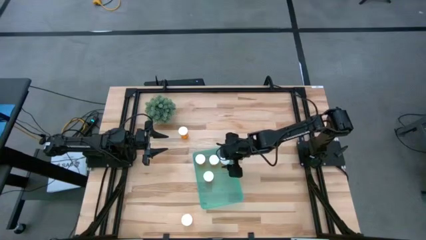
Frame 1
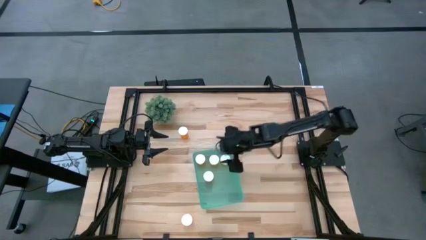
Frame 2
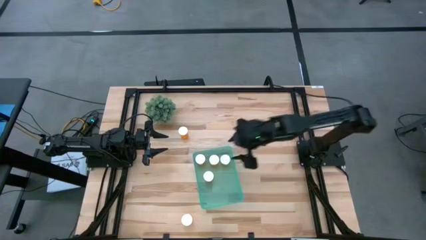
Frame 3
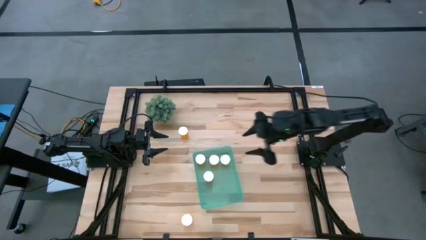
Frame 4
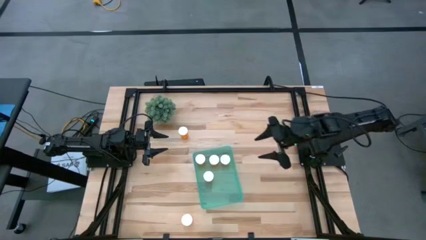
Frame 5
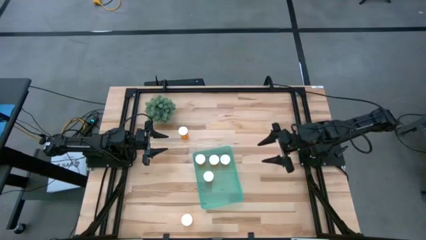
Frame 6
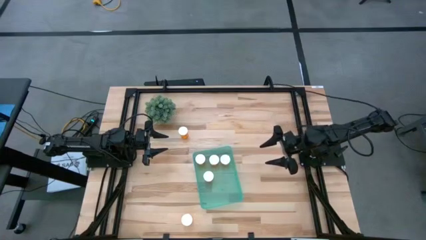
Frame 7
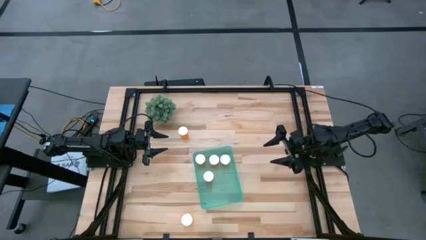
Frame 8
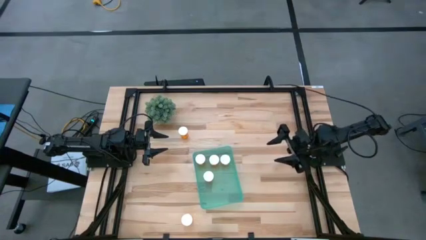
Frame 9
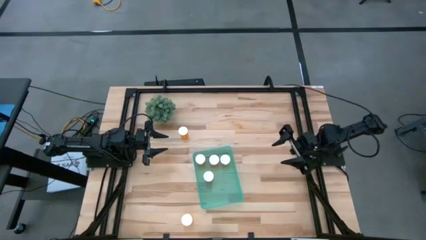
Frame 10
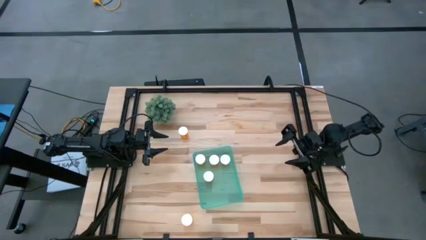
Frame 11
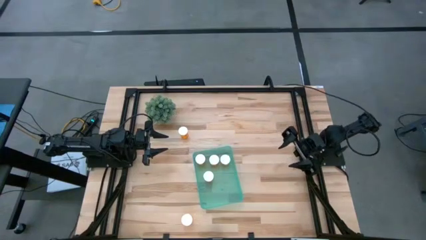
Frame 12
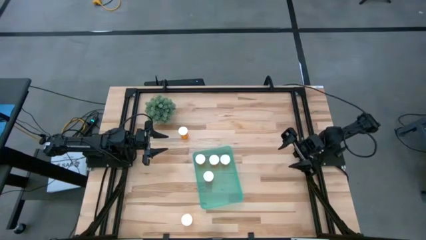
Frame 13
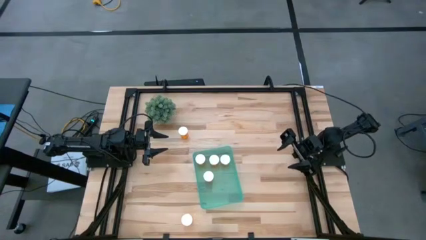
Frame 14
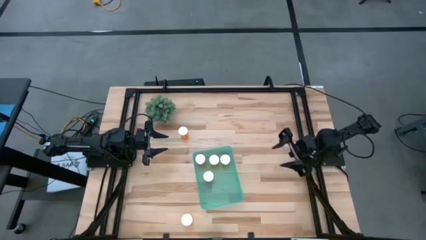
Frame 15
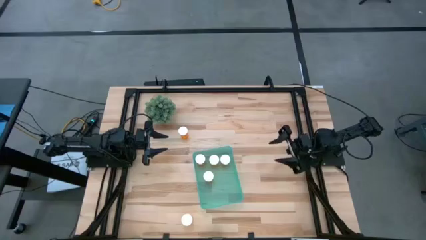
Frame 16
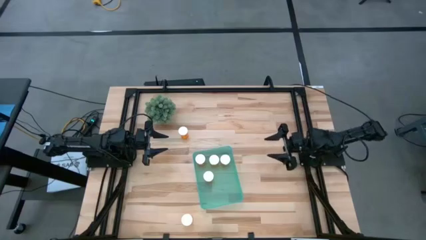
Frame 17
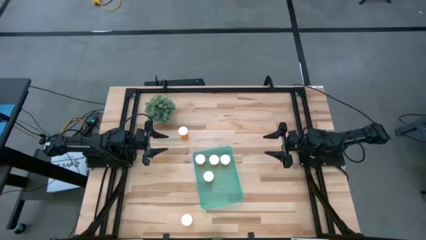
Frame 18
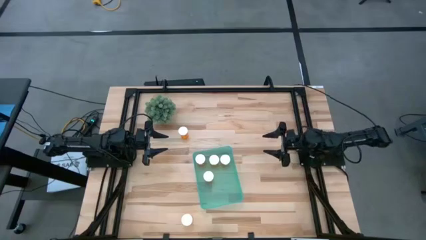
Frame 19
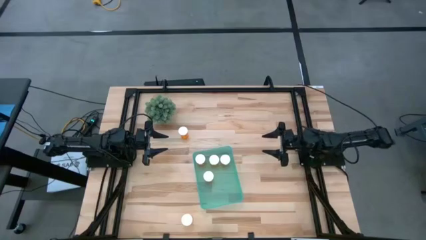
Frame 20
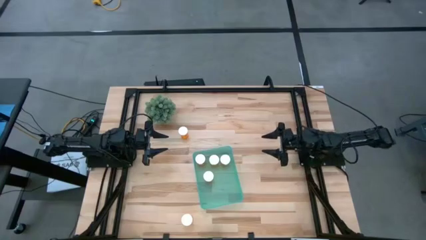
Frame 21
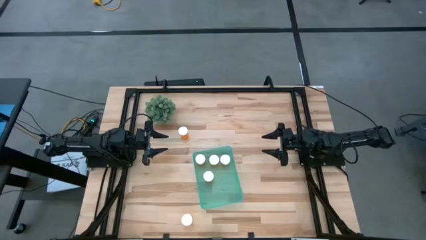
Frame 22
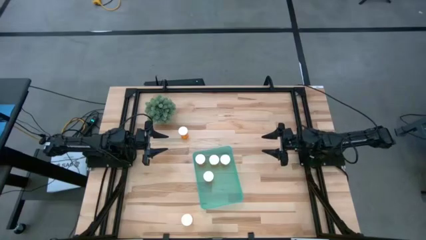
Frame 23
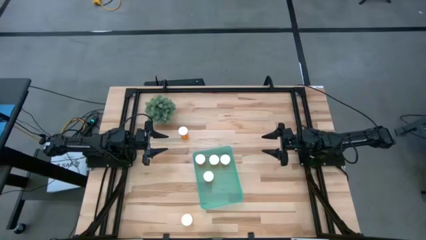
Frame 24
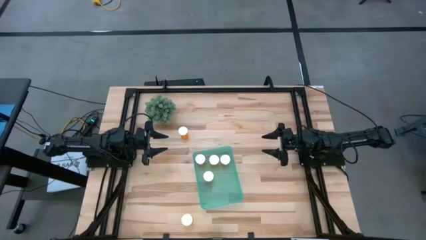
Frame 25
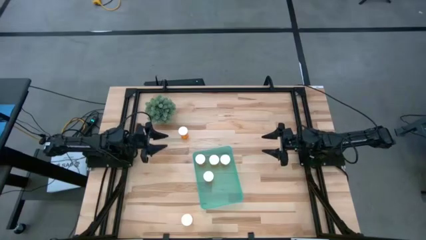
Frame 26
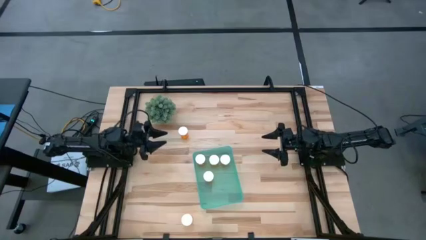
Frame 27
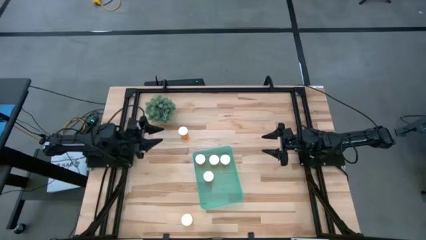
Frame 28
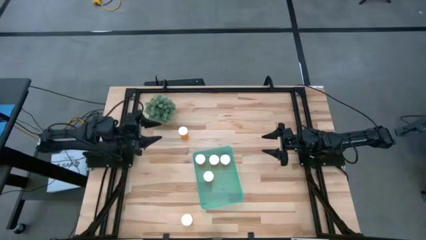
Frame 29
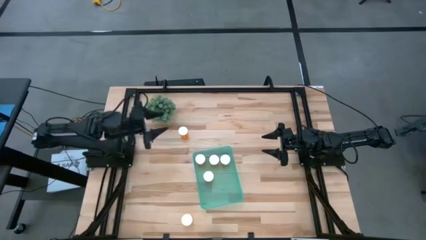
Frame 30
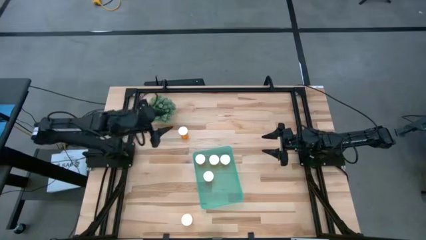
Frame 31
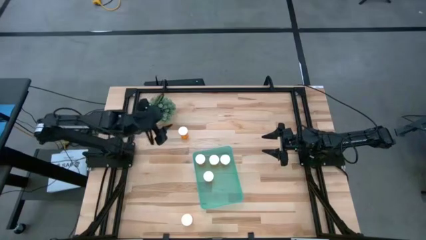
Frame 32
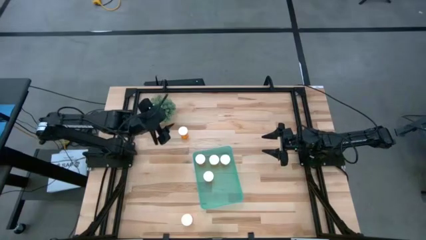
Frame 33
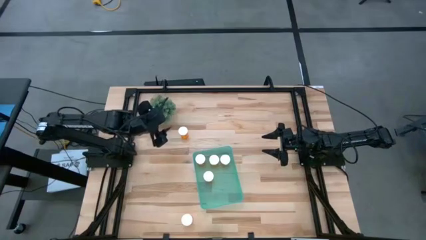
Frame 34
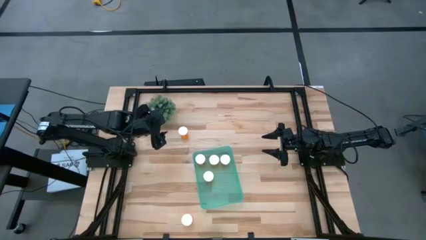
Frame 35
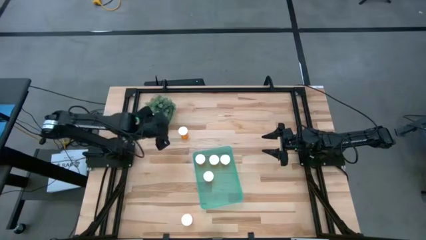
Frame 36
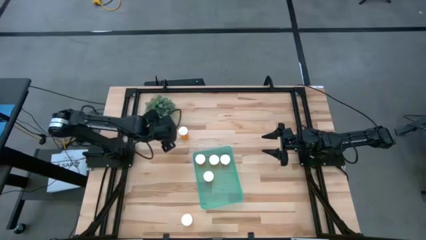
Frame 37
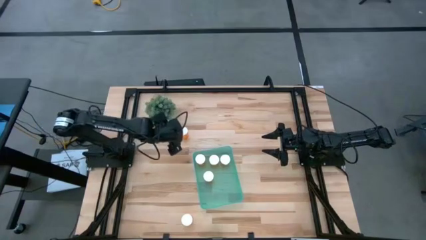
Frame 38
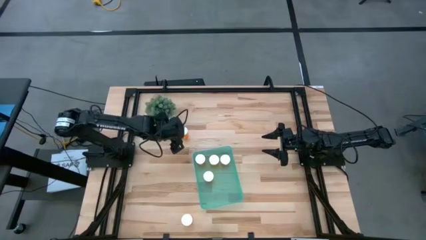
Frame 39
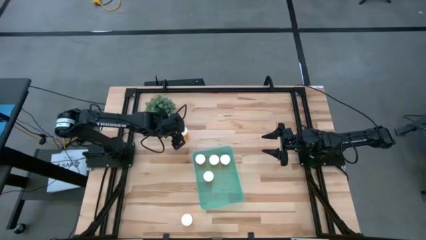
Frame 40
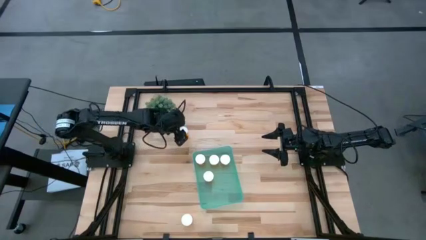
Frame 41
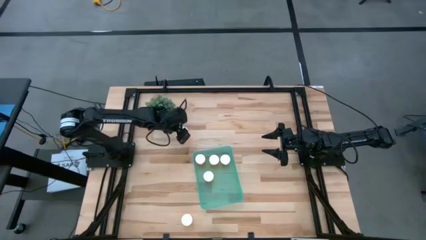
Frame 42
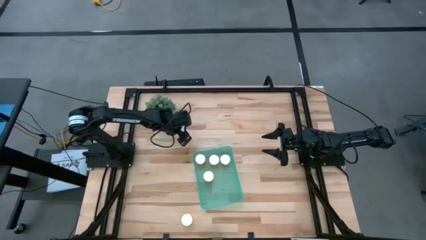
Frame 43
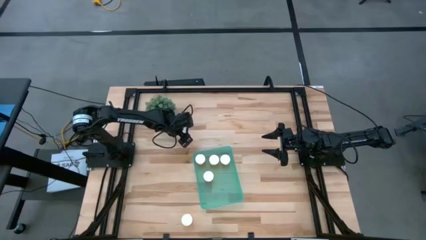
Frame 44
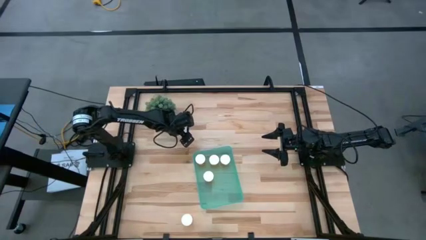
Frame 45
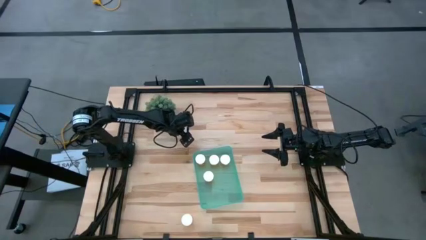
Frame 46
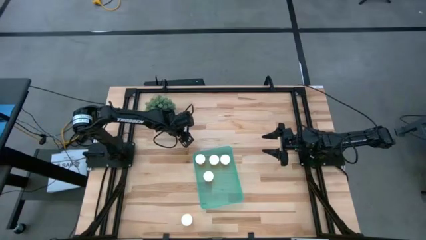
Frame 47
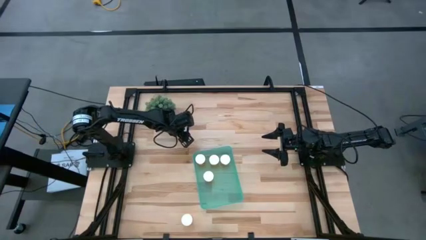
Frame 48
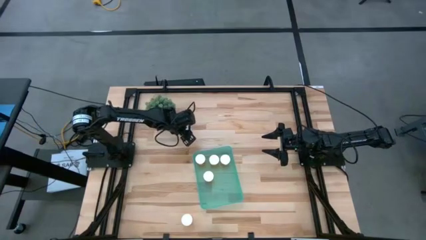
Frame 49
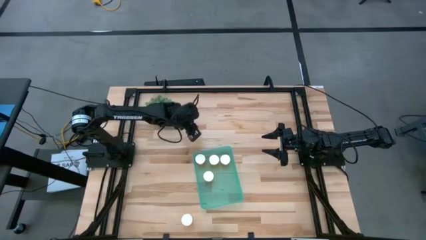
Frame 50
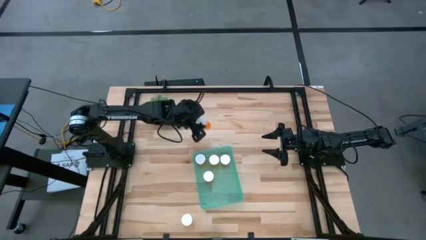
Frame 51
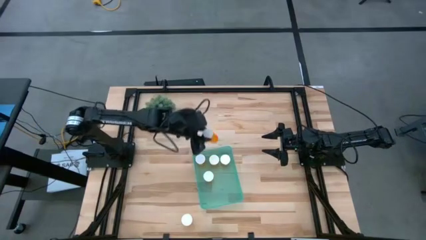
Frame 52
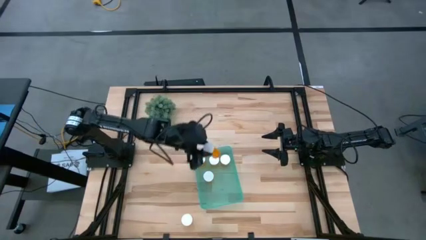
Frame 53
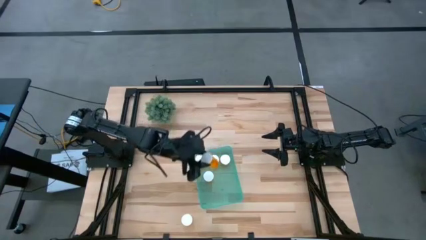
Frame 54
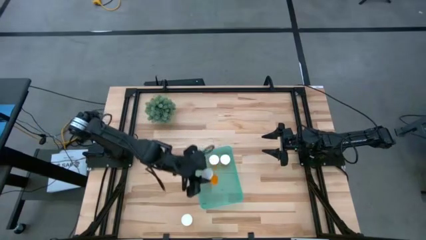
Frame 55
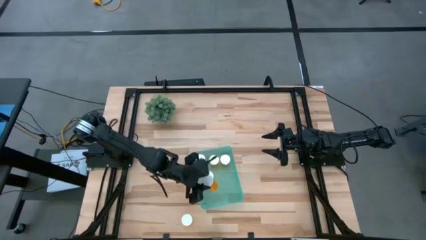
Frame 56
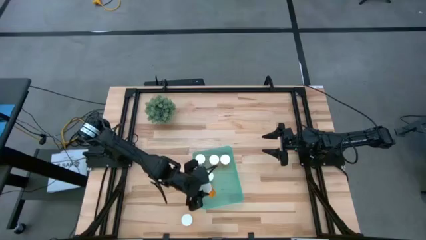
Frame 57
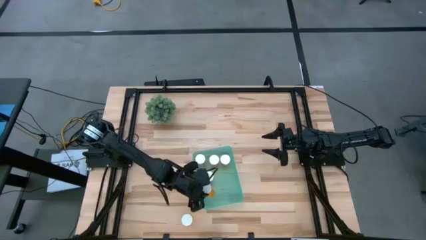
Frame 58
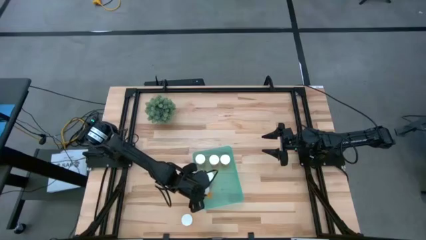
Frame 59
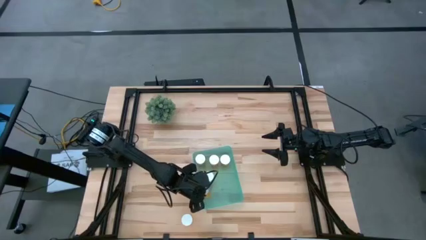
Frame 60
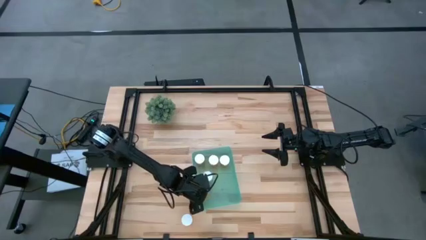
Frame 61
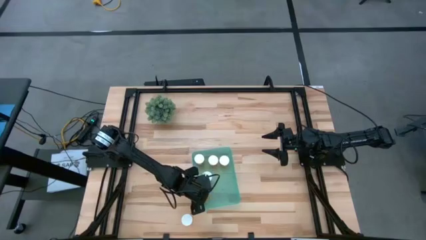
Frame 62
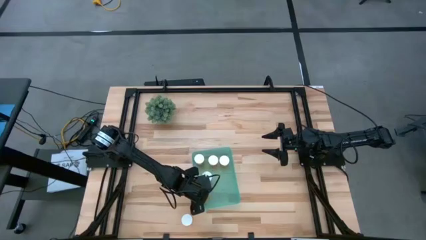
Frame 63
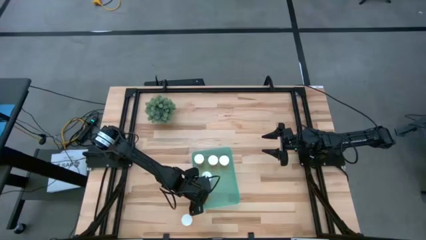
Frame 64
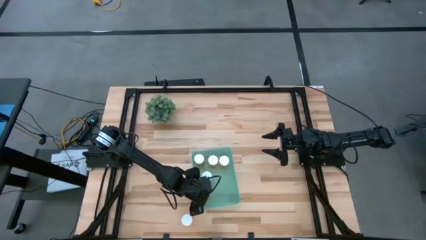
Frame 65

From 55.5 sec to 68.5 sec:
Task: Pick and place pill bottles into a basket
Put the orange pill bottle into the green bin
